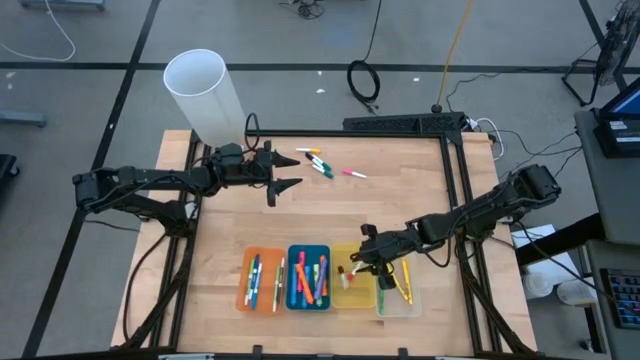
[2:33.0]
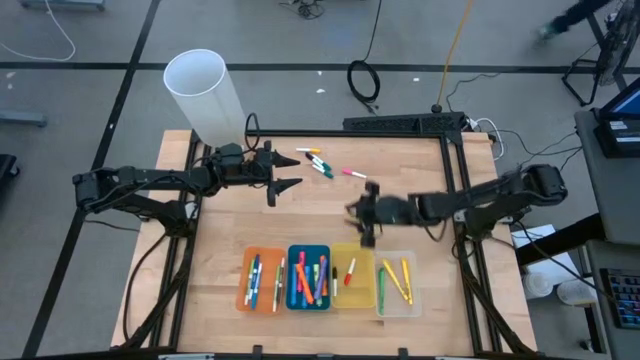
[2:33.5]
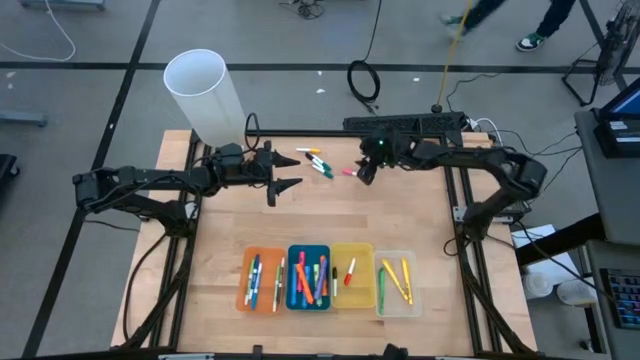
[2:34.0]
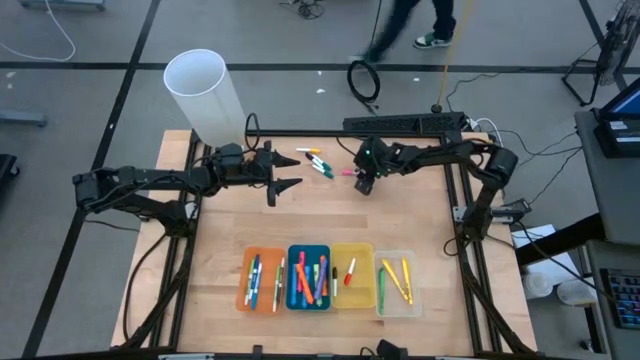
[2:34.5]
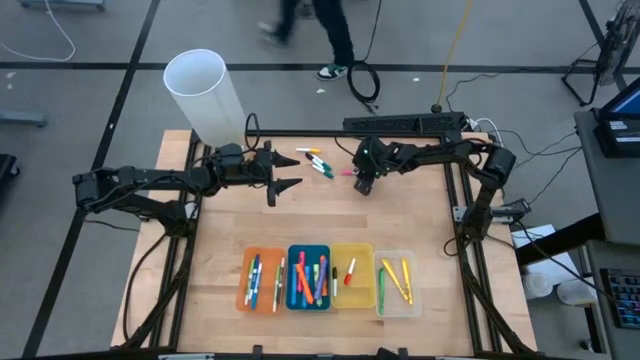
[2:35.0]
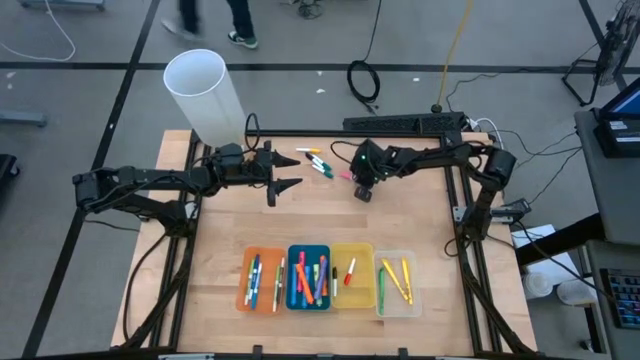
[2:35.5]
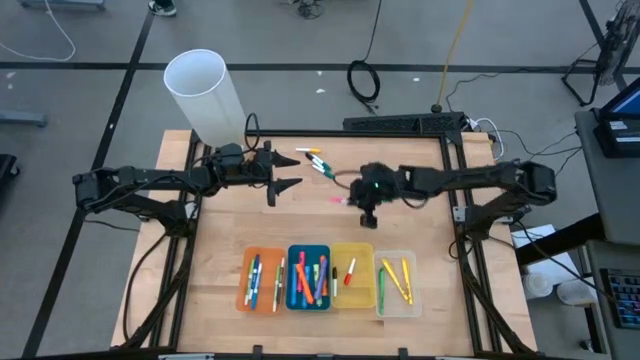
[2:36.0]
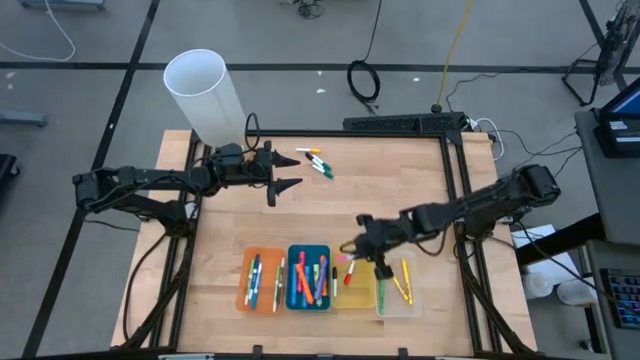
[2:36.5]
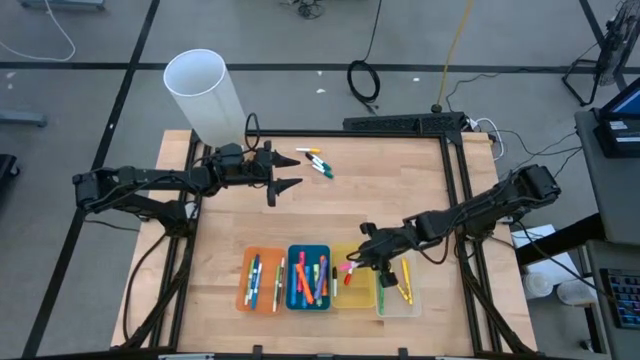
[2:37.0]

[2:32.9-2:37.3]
Task: Pick & Place Markers
Put the pink white highlighter pen into the yellow bin

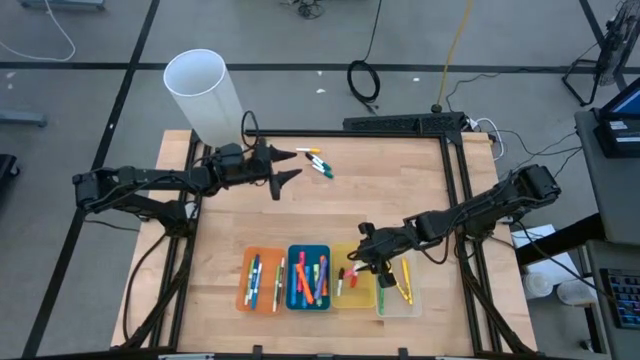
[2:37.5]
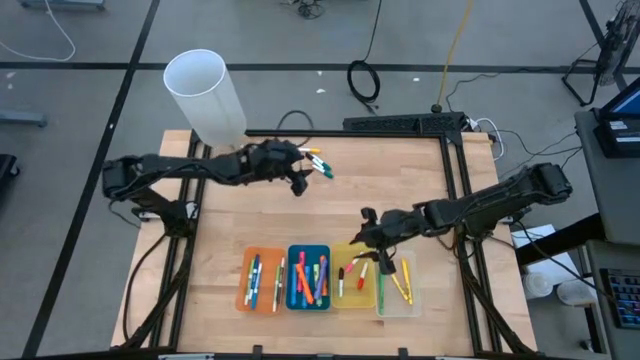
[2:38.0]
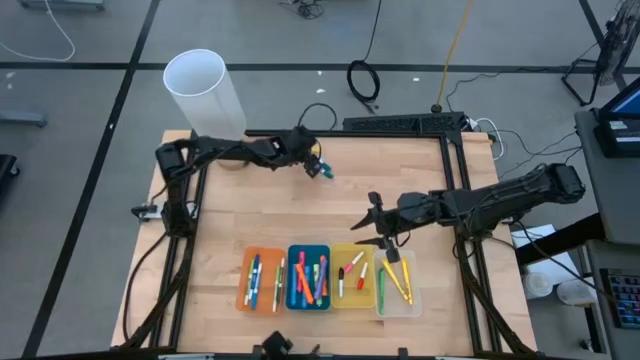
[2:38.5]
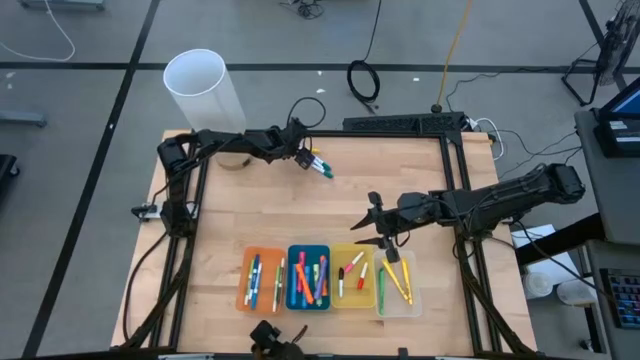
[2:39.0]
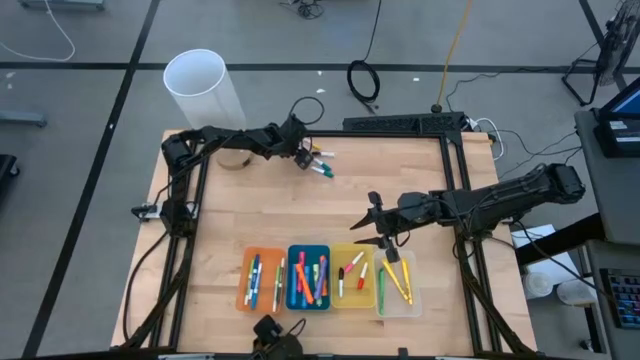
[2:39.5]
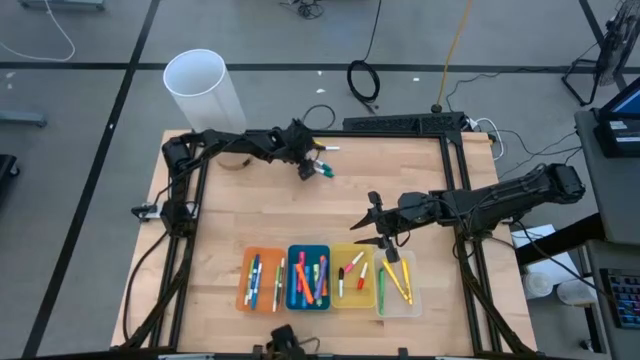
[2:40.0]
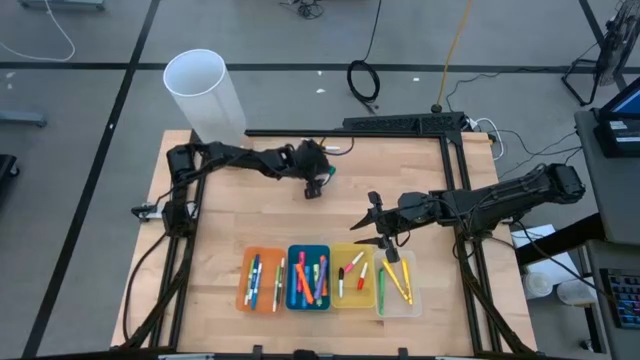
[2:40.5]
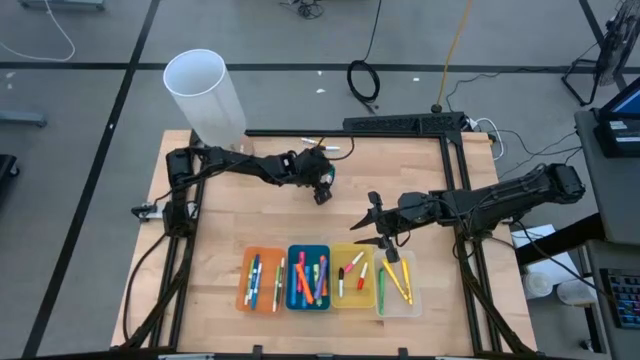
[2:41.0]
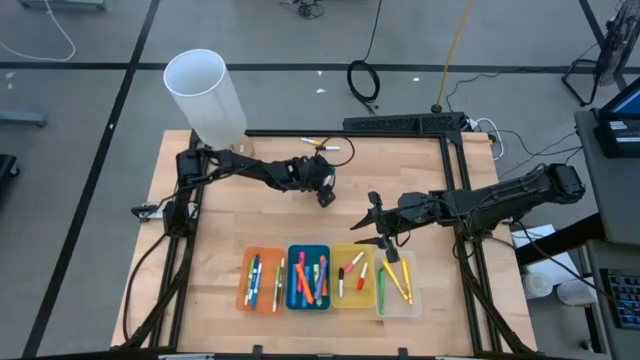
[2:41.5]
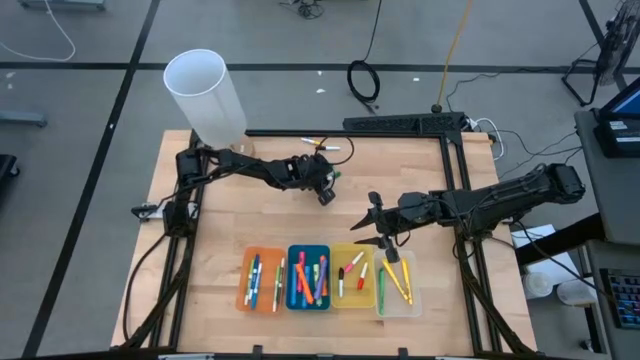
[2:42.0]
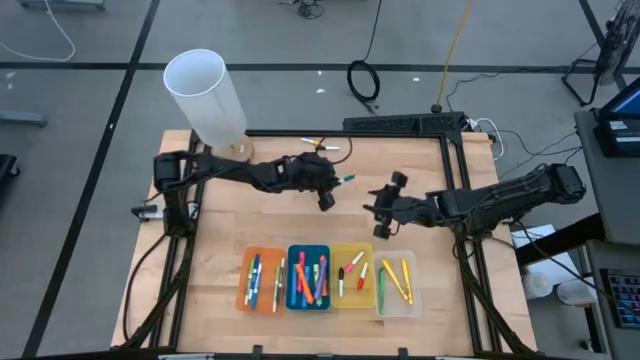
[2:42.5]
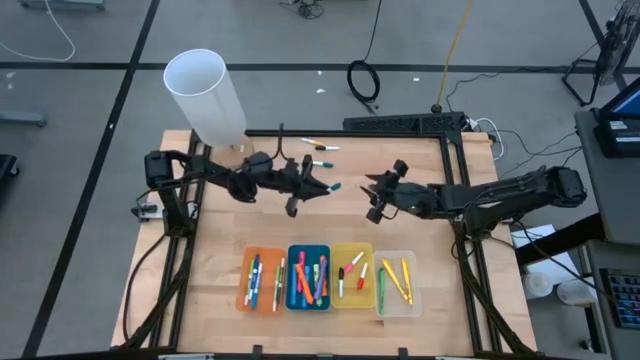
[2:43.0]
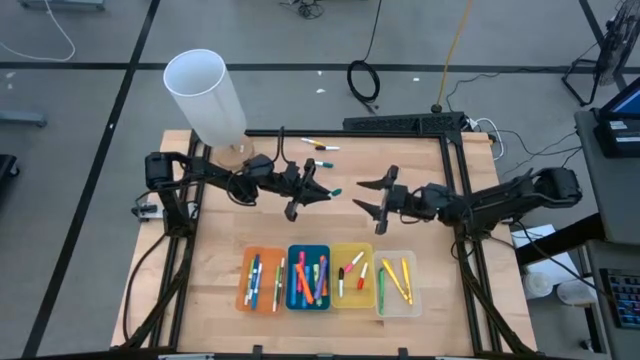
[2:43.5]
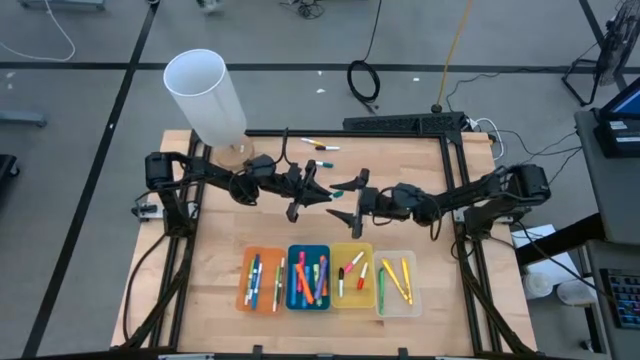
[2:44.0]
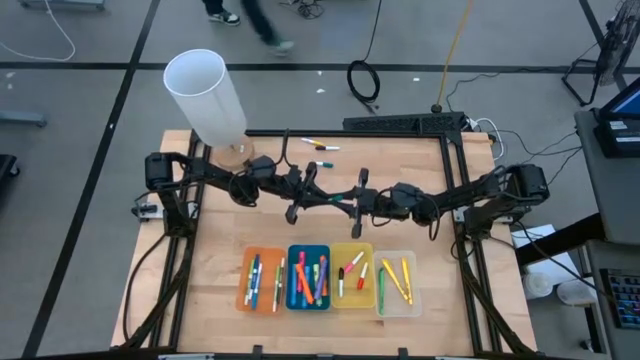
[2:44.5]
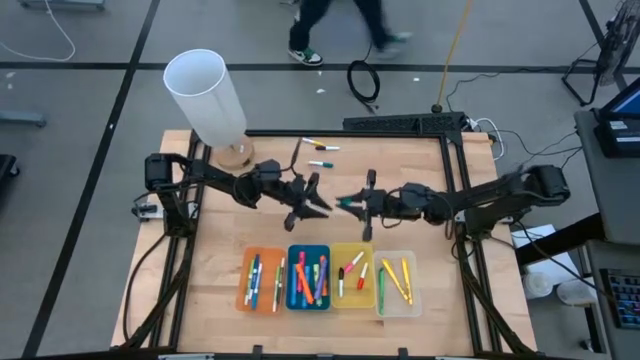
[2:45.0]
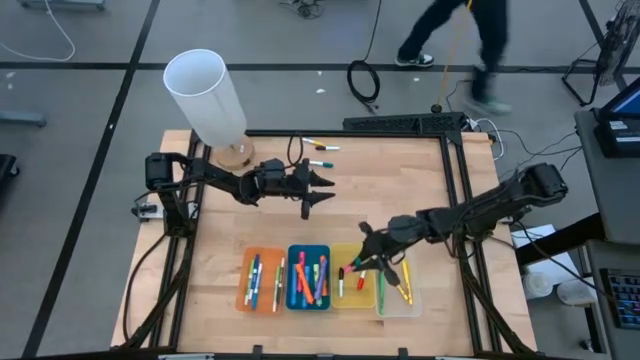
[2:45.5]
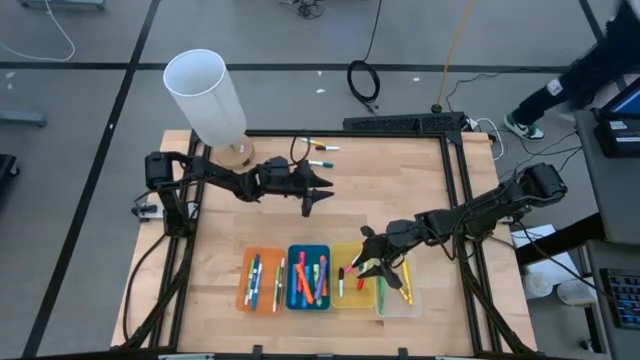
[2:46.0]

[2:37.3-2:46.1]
Put the bottom green highlighter pen into the yellow bin

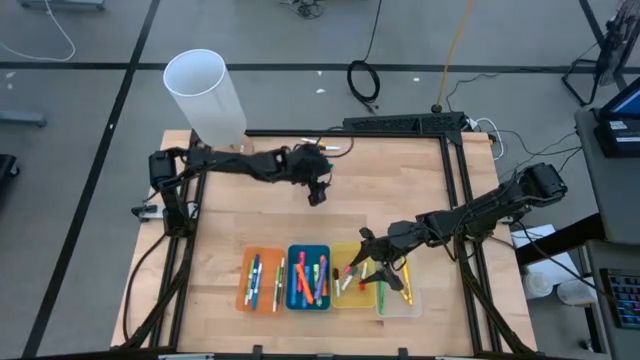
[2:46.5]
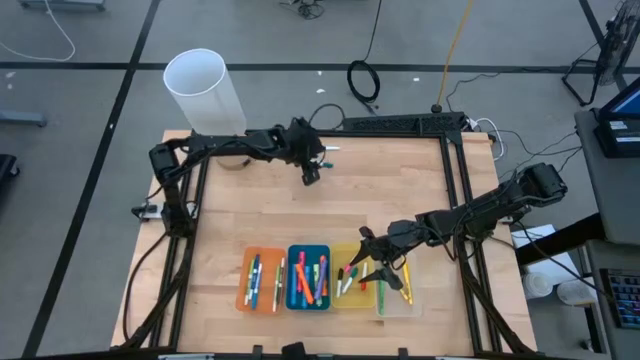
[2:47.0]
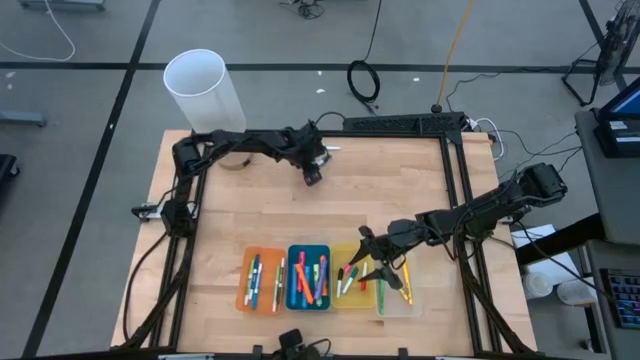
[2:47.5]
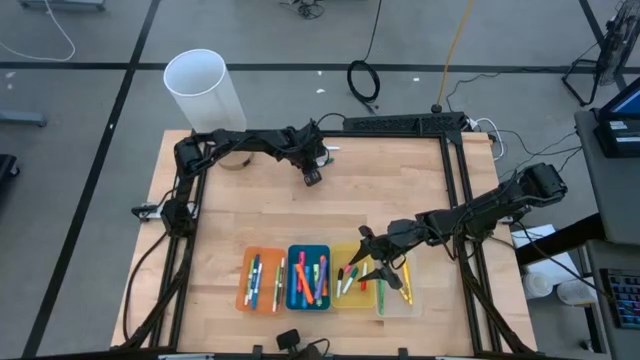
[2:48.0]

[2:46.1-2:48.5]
Put the green highlighter pen into yellow bin

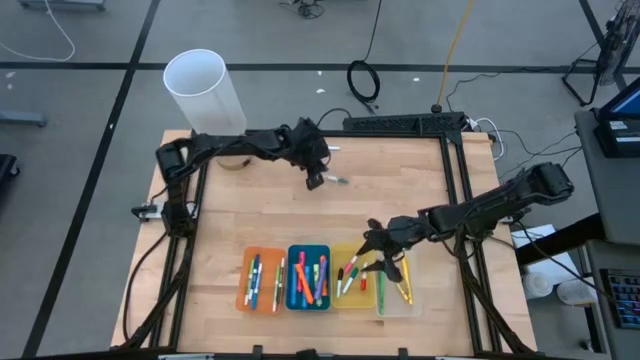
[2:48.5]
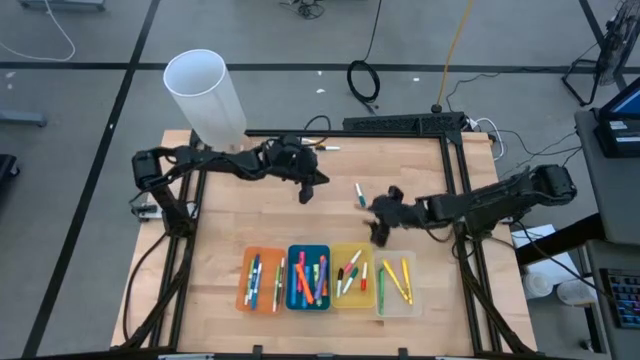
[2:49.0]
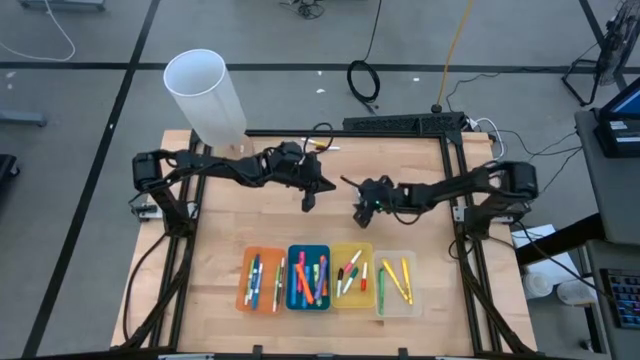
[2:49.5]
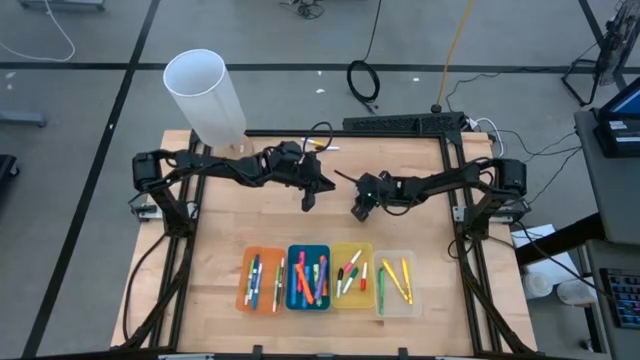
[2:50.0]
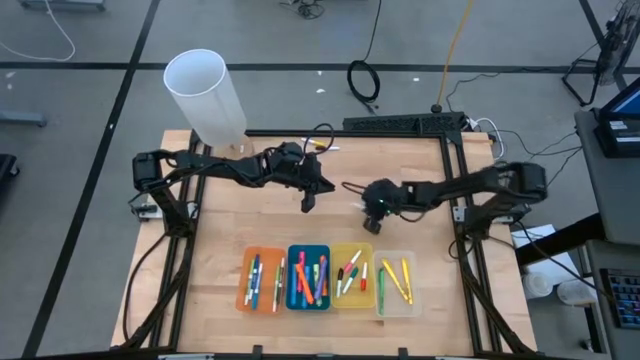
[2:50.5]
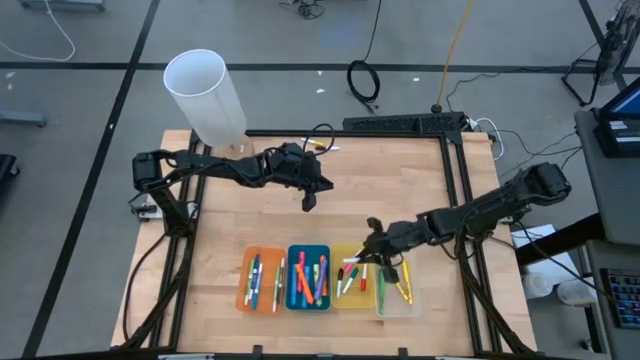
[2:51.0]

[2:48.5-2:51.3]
Put the green highlighter pen into the yellow bin

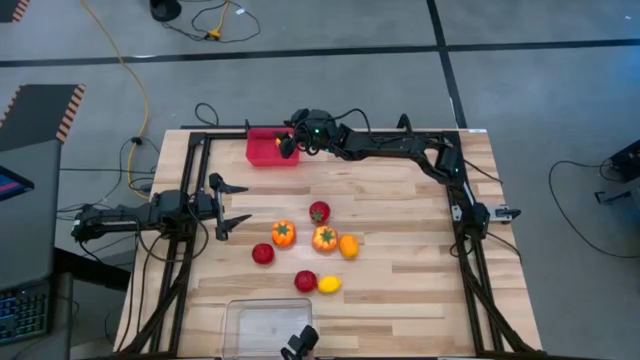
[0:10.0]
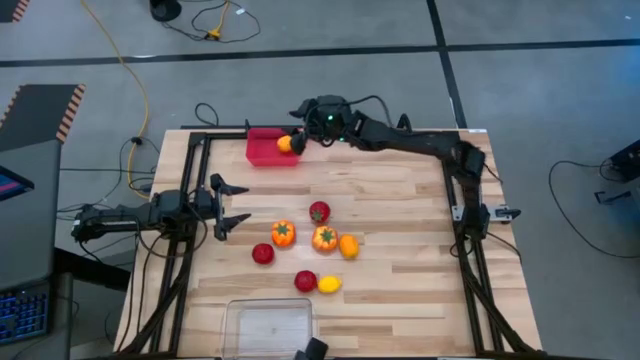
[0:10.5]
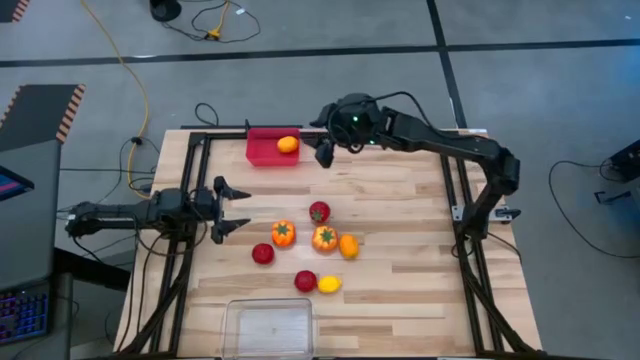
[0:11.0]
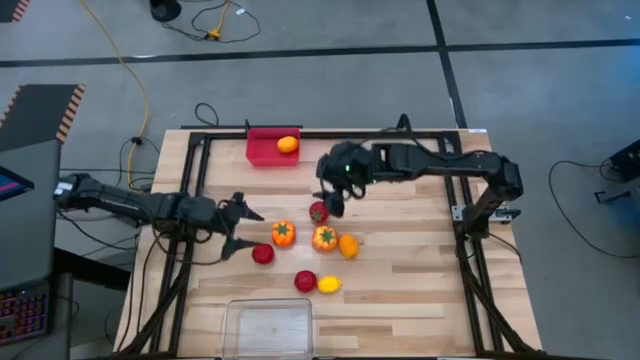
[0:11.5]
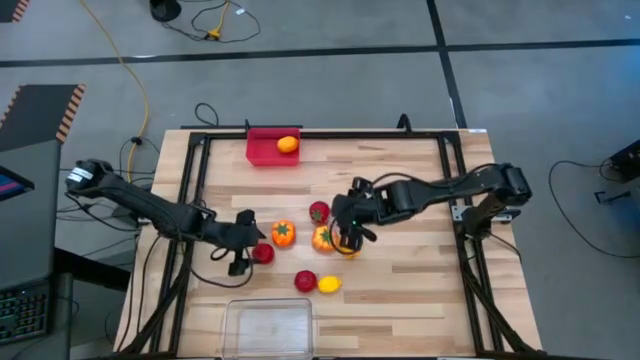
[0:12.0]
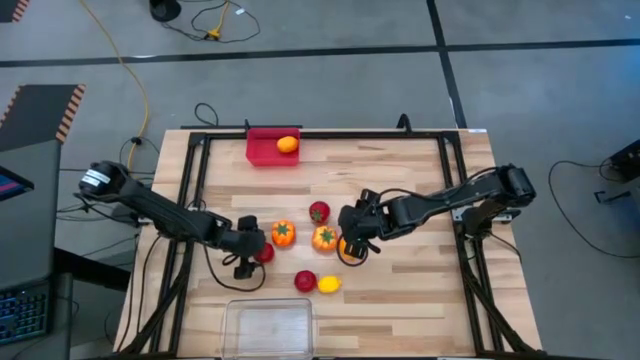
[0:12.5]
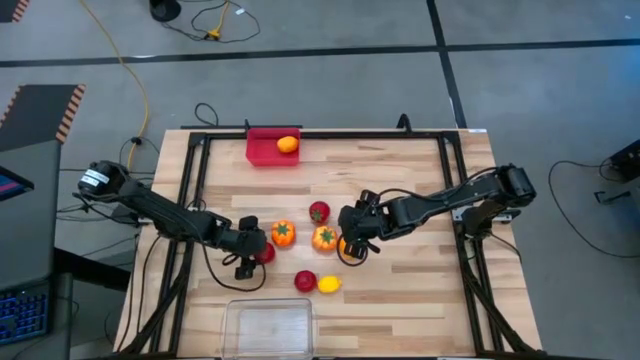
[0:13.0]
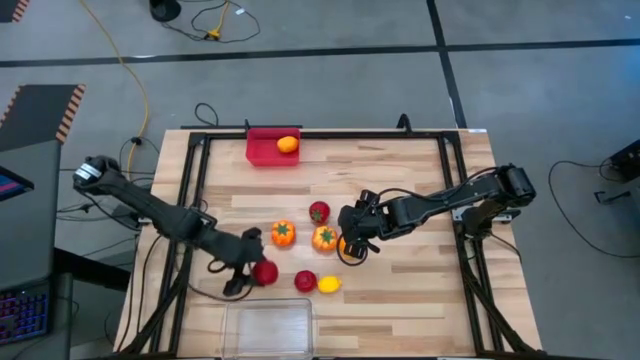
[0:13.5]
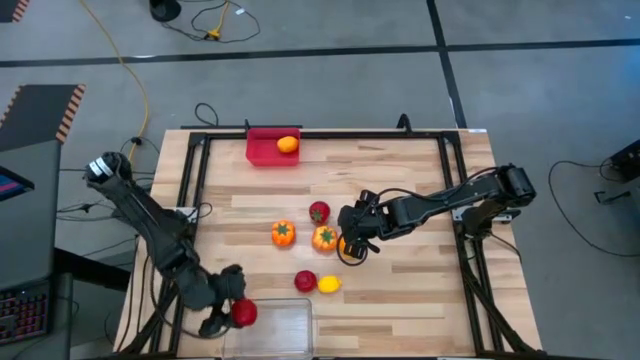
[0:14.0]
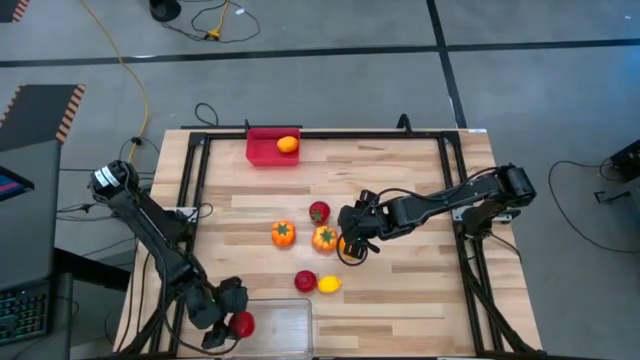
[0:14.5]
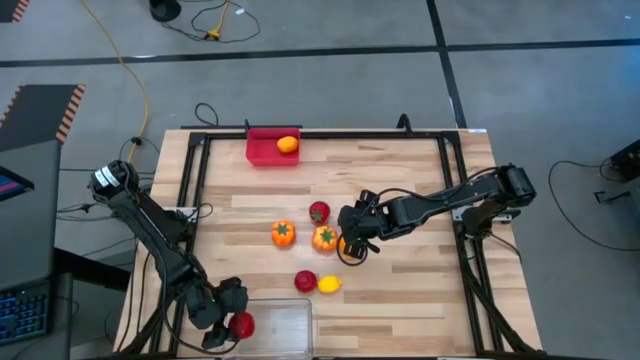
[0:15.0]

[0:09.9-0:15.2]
Task: Sort produce into baskets
Put the middle left red tomato into the transparent bin
